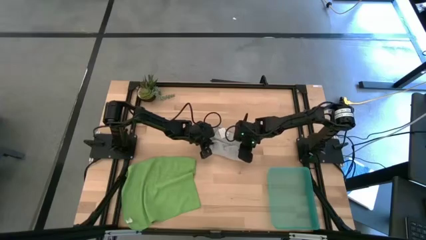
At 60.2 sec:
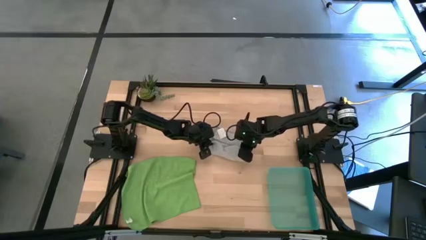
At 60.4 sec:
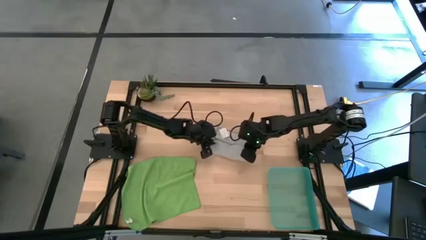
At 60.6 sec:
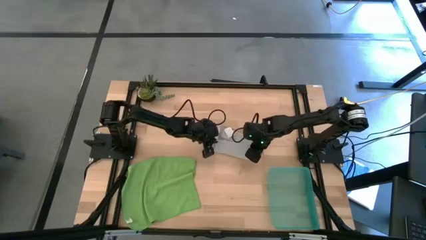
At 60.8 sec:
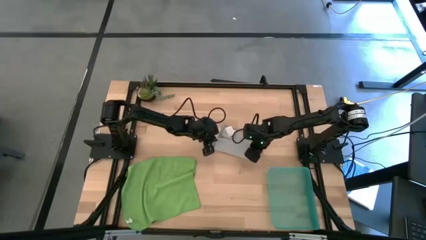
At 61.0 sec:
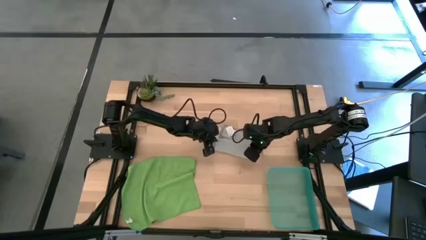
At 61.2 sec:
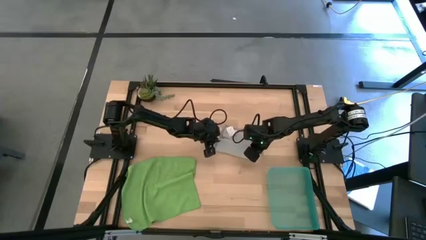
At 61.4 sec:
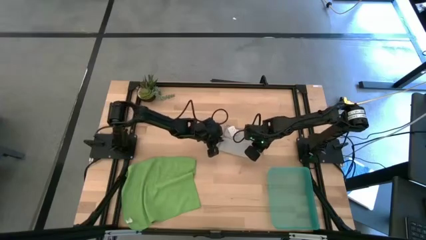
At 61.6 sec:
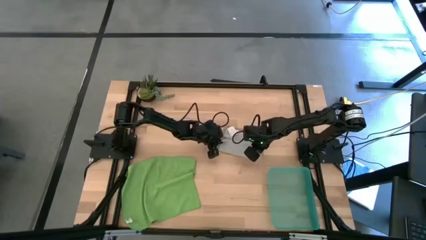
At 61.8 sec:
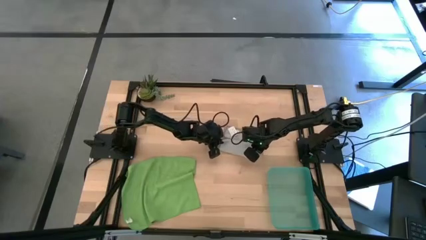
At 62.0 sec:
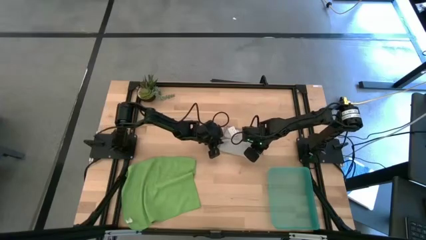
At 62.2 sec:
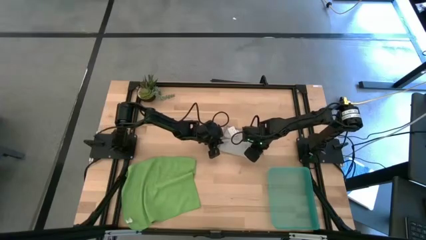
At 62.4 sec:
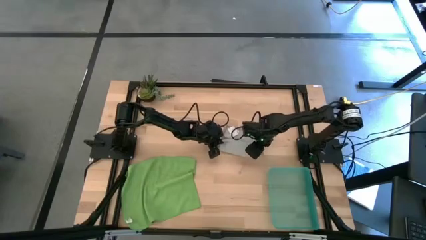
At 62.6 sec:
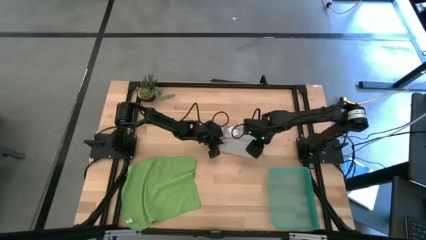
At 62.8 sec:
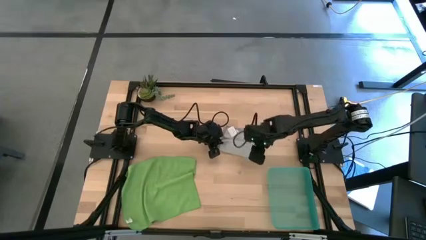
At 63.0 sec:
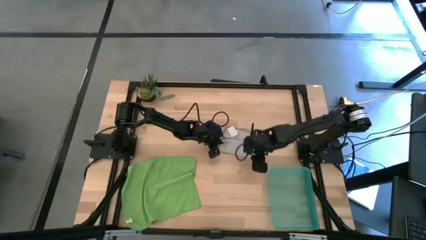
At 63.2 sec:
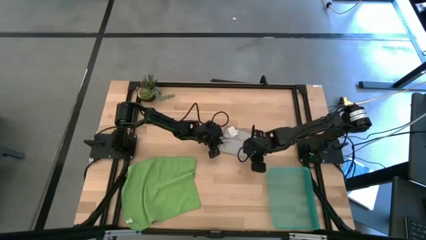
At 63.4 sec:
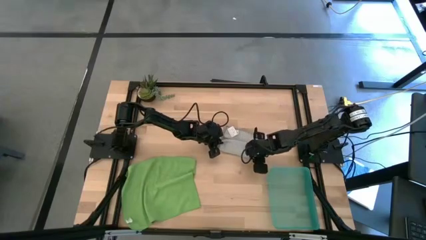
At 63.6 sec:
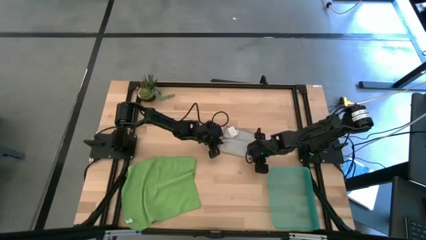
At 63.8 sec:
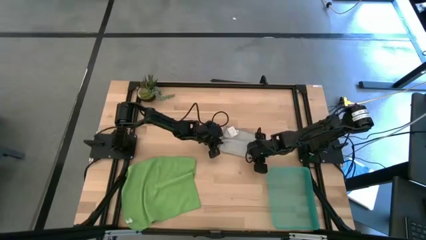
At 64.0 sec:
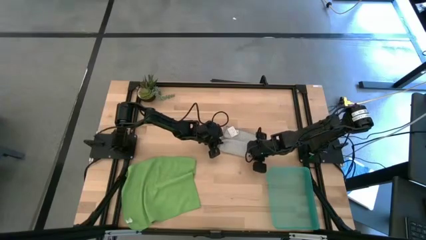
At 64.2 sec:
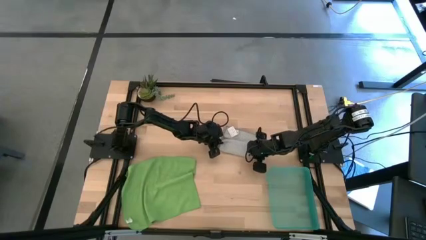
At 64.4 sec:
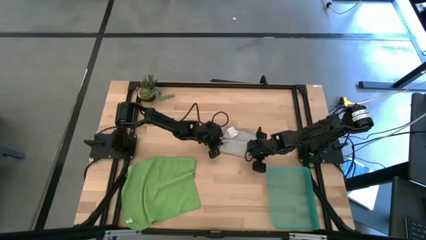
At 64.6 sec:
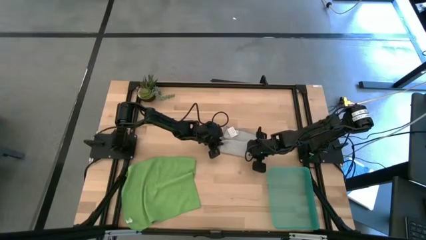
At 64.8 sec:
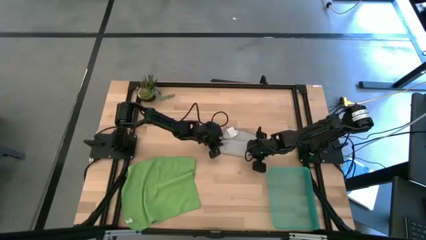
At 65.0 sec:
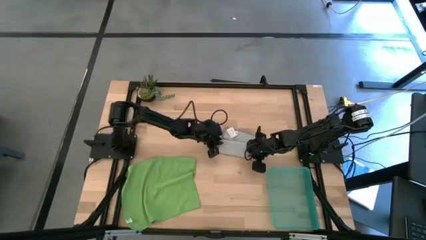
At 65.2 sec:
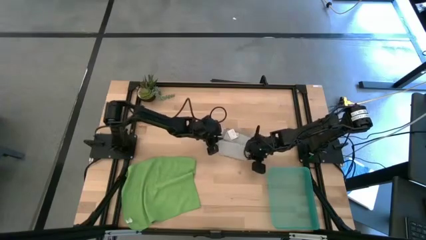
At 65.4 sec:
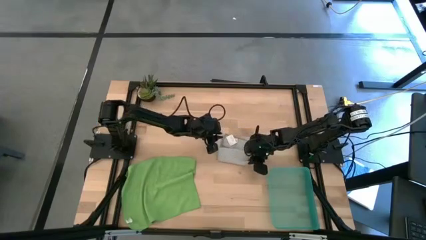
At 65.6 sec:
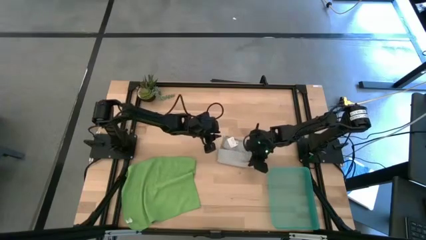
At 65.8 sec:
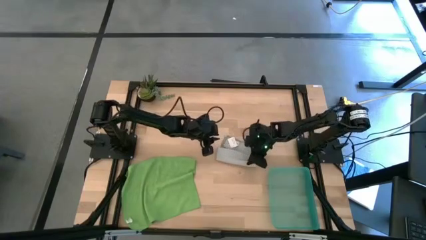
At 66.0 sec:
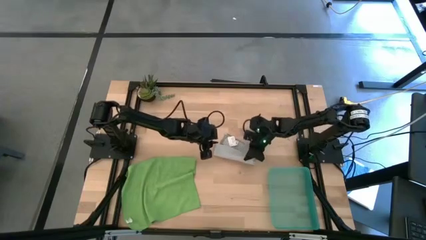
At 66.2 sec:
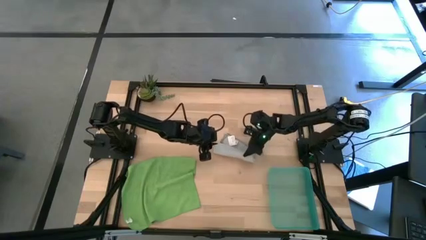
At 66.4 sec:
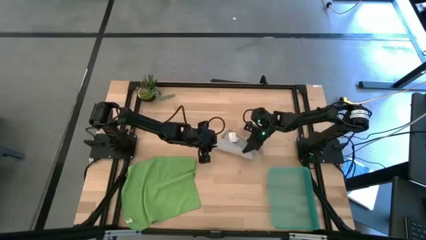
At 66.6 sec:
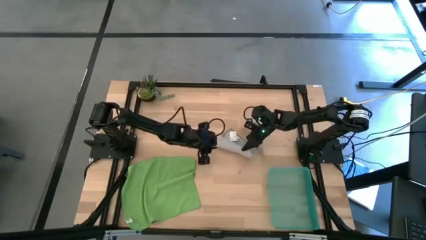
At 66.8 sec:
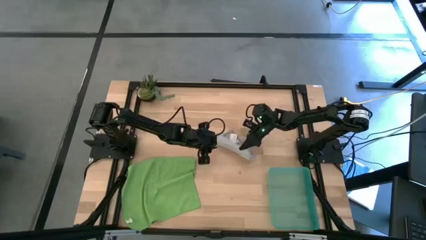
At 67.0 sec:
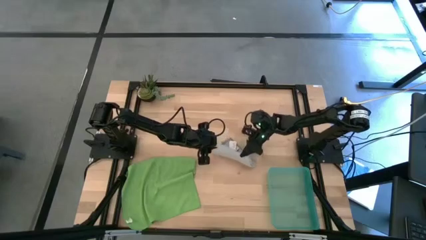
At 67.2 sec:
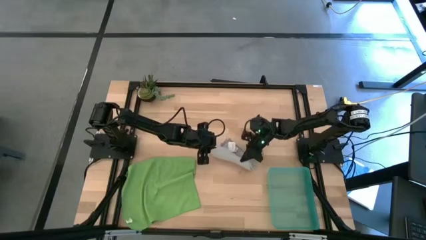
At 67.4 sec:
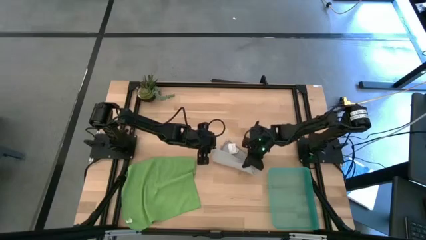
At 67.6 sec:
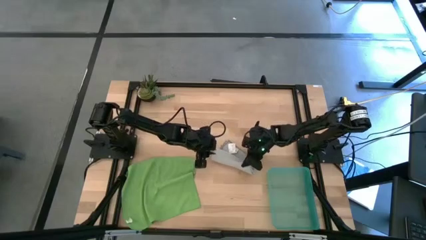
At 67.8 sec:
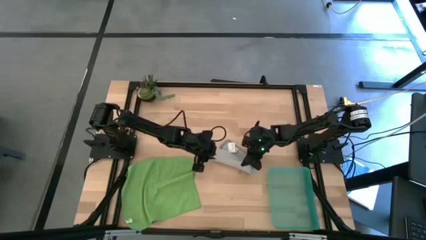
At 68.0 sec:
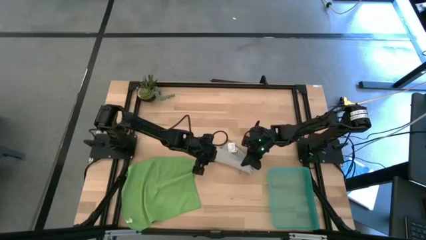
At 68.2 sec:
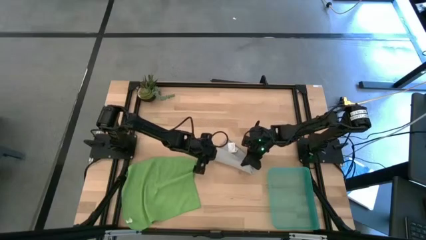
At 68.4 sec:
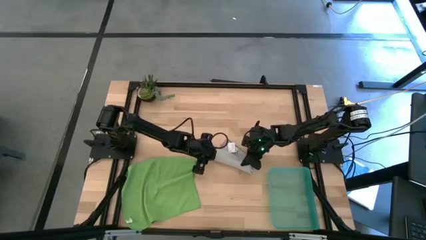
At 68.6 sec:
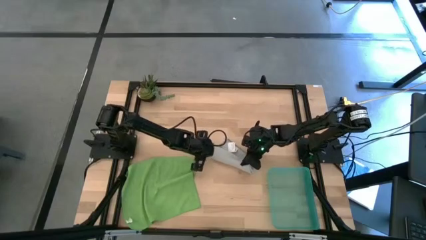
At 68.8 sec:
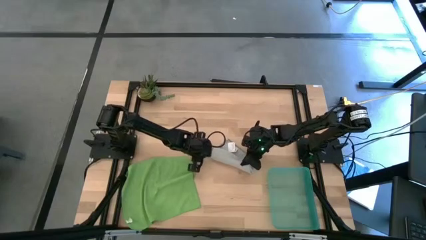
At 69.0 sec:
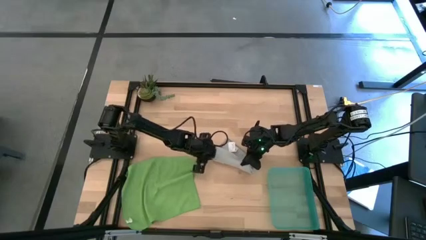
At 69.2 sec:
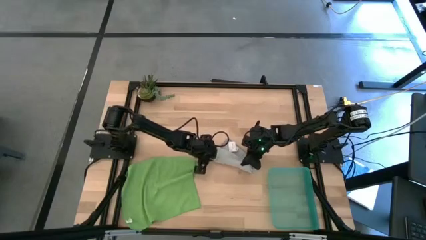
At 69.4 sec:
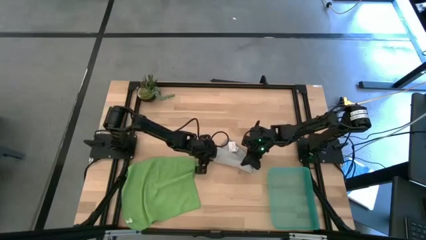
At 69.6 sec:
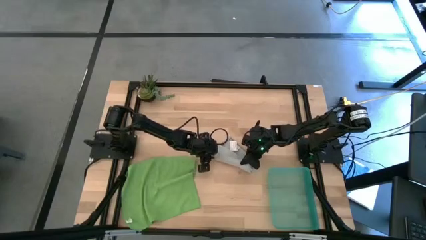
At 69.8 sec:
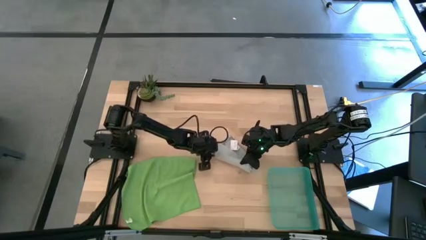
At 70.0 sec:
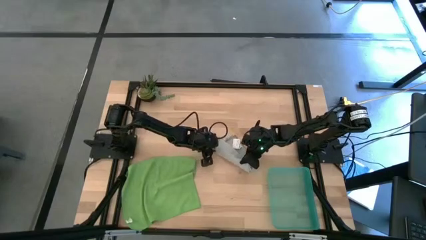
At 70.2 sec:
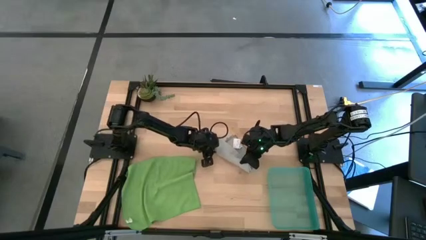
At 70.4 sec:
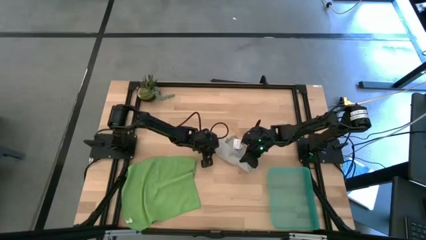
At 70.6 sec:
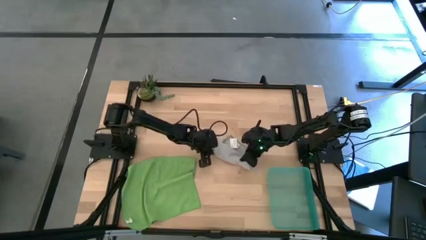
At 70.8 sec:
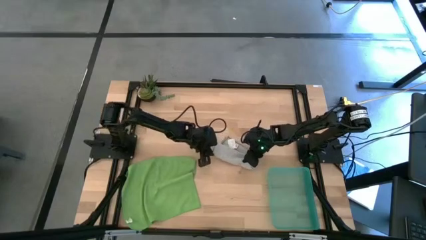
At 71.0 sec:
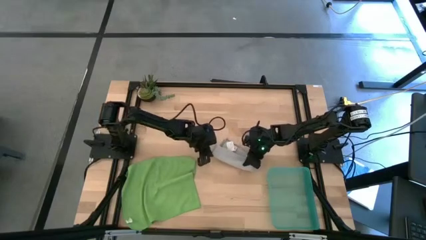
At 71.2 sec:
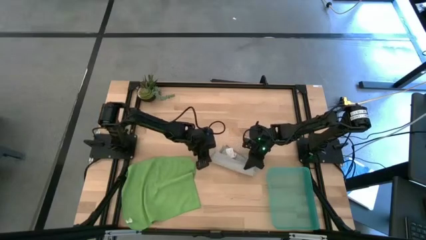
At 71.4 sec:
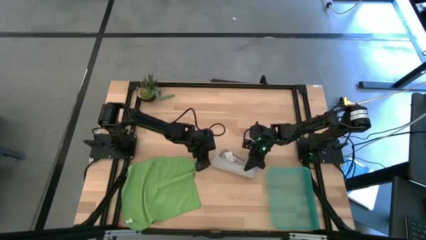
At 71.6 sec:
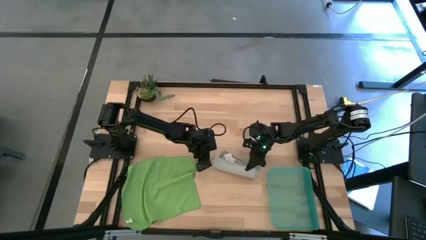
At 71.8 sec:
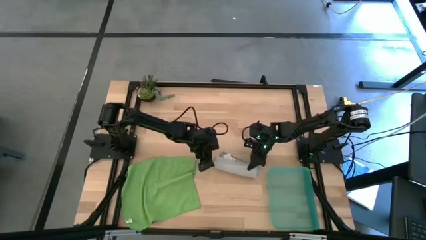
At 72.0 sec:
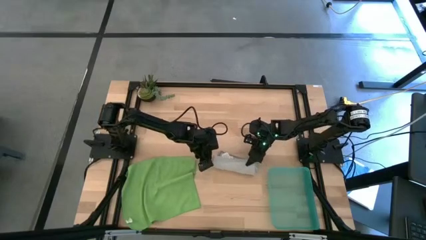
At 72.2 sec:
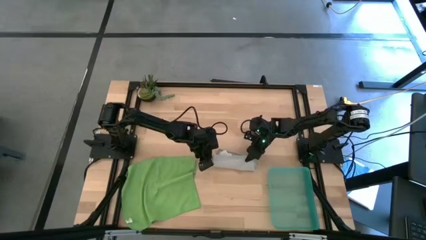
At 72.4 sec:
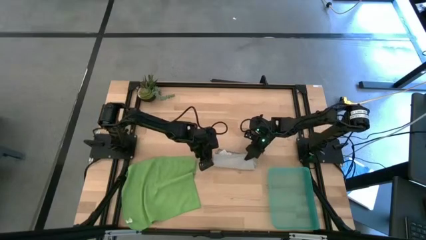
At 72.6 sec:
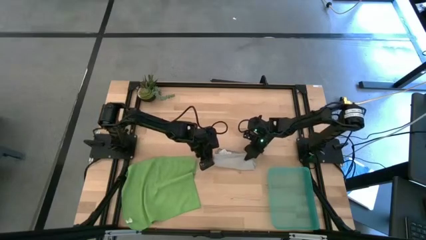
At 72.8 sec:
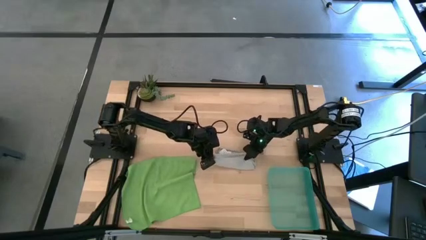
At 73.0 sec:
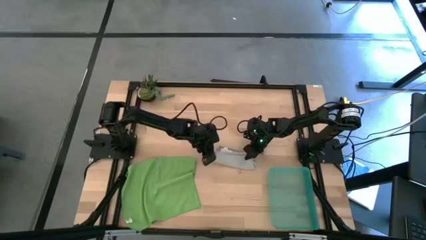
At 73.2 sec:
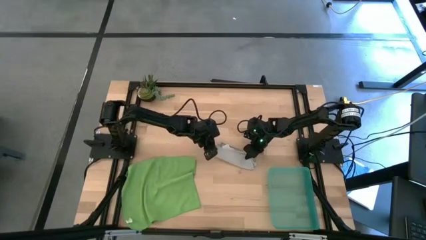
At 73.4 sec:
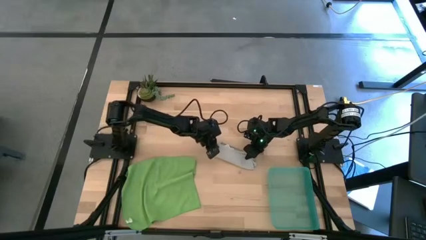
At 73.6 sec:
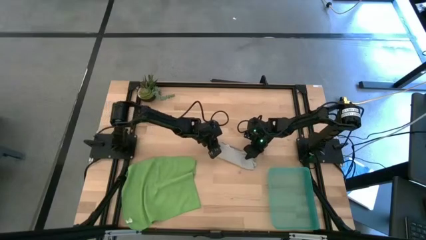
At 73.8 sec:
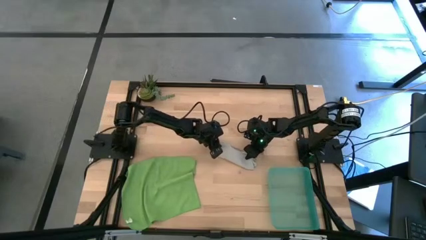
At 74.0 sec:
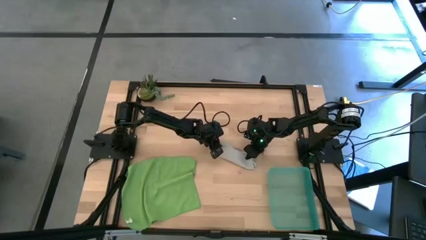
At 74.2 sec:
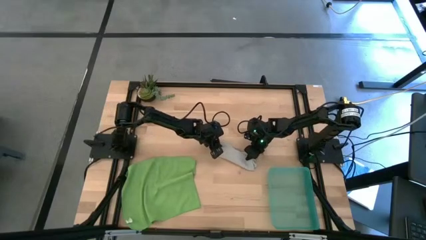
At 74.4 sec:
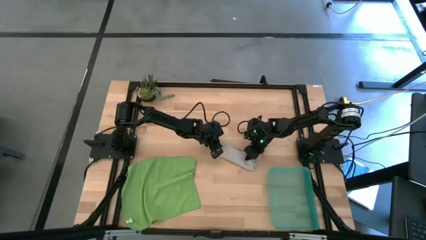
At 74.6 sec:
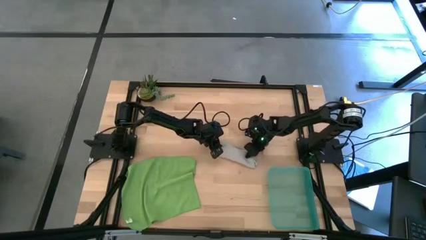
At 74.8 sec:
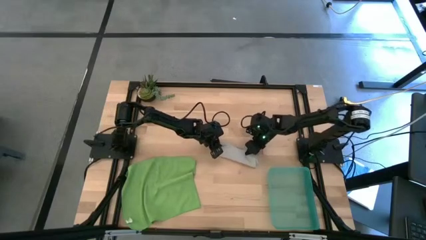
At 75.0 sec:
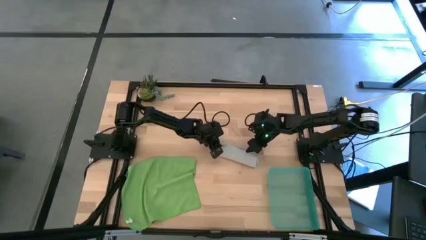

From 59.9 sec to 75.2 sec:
Task: Roll microfiber towels into tight, uniform cylinder then place into a basket
Roll the gray microfiber towel

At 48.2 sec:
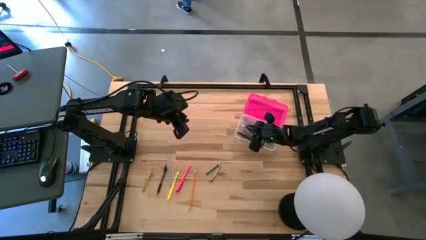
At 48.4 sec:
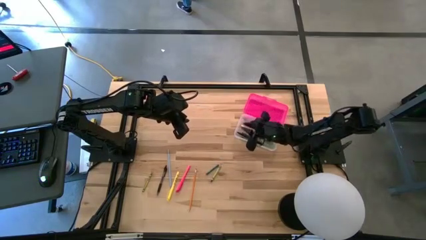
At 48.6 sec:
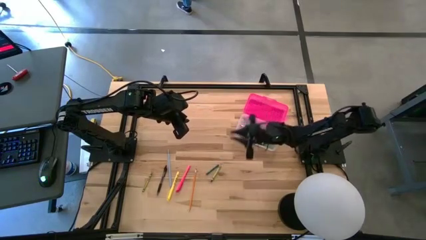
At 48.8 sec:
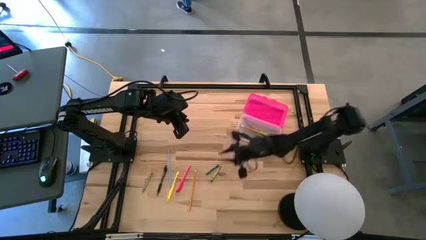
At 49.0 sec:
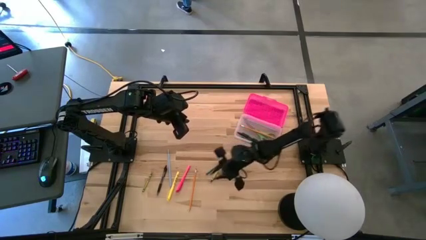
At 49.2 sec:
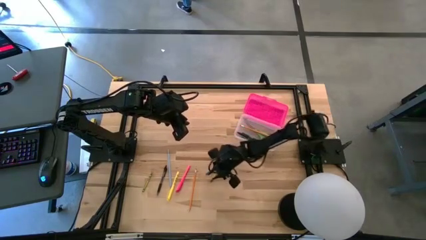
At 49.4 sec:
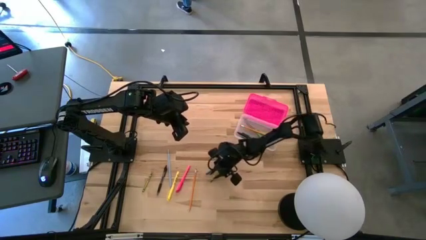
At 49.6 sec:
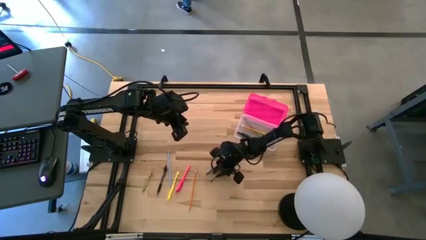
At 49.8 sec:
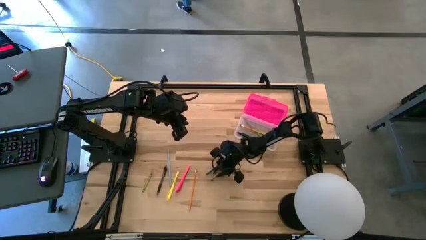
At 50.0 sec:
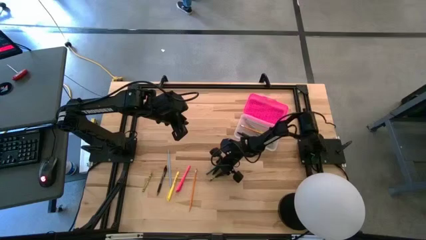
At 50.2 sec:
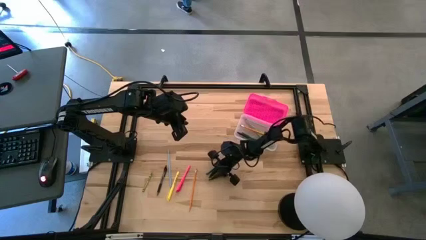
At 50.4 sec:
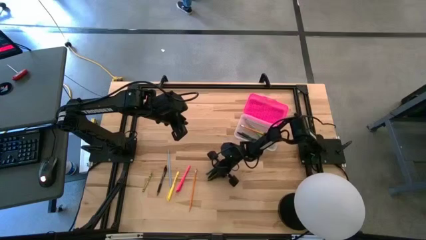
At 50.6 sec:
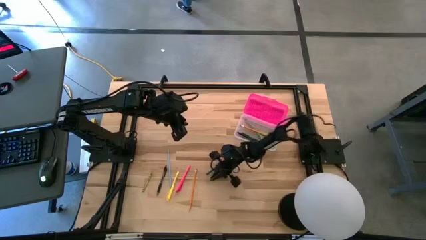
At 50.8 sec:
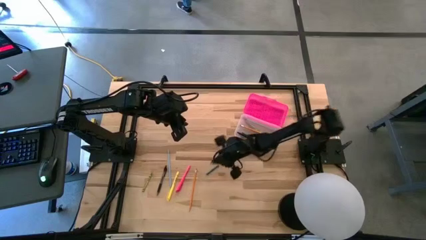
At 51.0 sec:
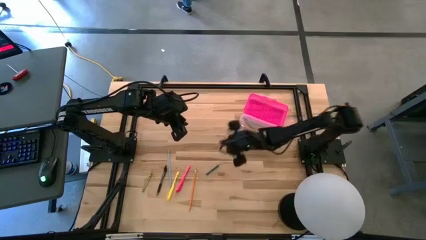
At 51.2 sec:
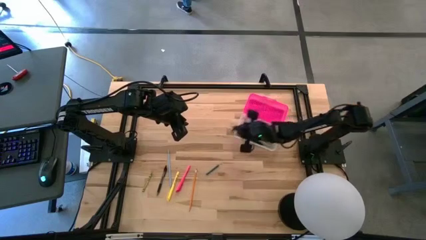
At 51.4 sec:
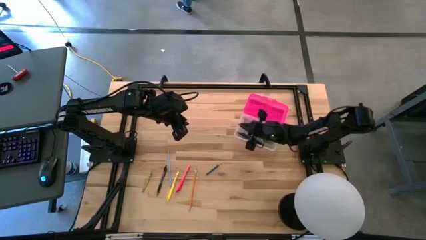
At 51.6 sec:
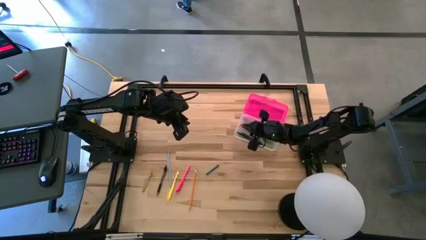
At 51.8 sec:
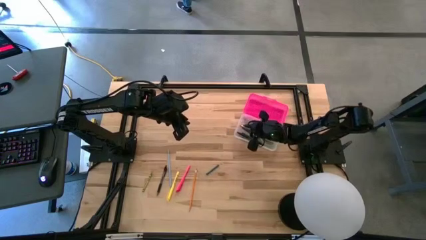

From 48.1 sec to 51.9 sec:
Task: Pick & place school supplies into a supply box
Put the right green crayon into the pink supply box
